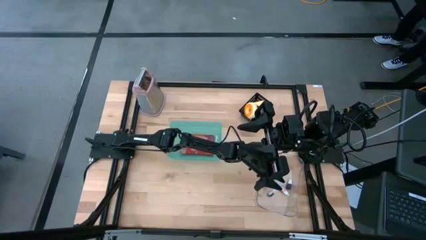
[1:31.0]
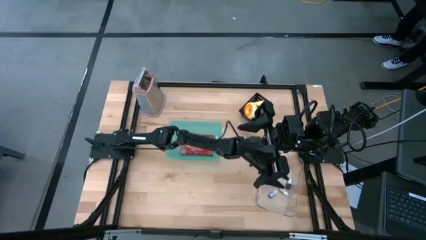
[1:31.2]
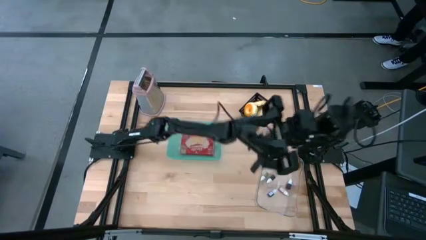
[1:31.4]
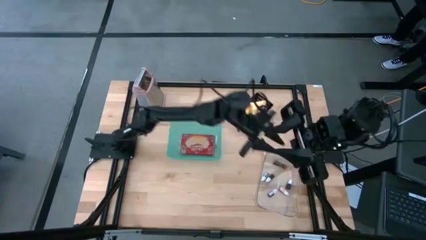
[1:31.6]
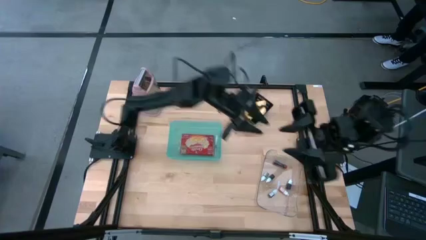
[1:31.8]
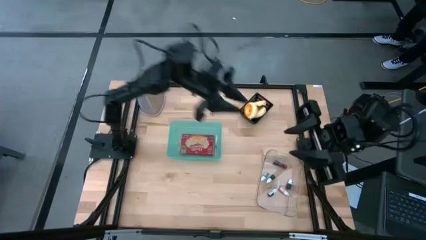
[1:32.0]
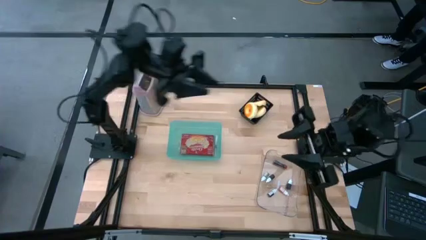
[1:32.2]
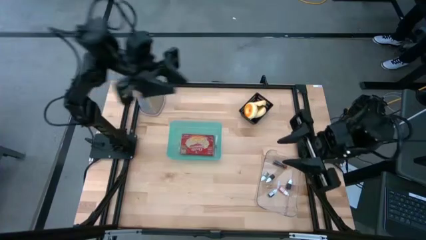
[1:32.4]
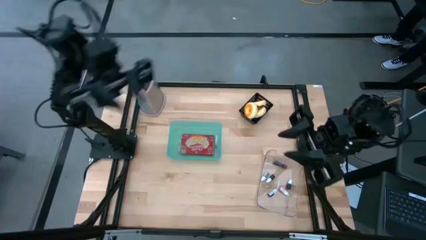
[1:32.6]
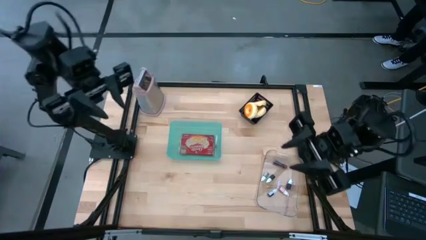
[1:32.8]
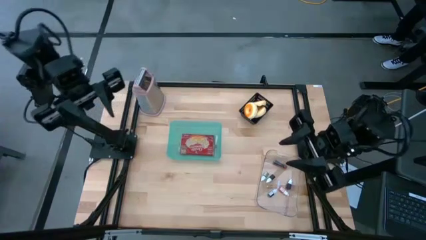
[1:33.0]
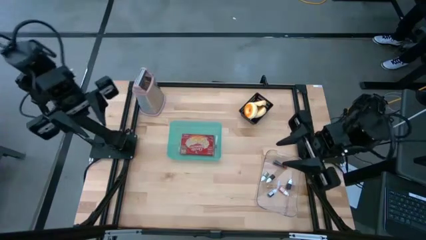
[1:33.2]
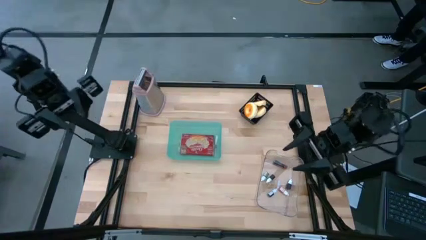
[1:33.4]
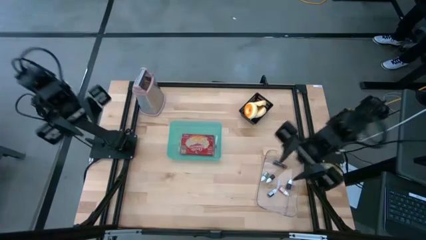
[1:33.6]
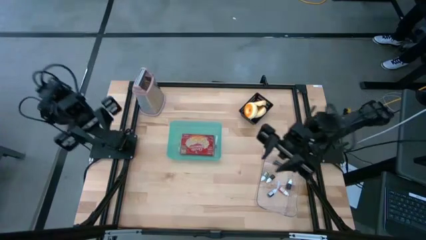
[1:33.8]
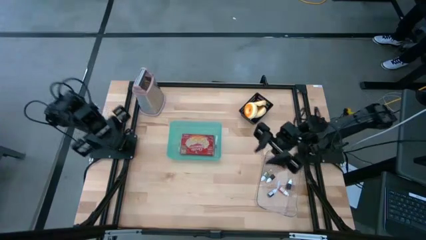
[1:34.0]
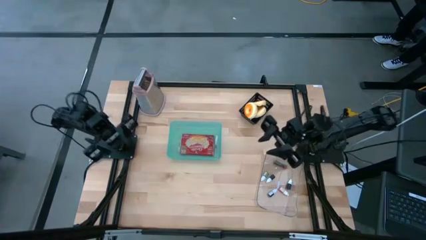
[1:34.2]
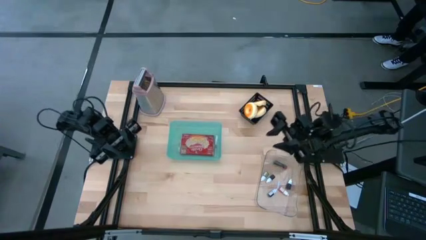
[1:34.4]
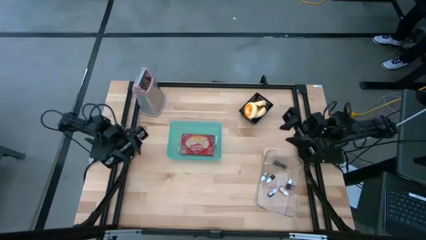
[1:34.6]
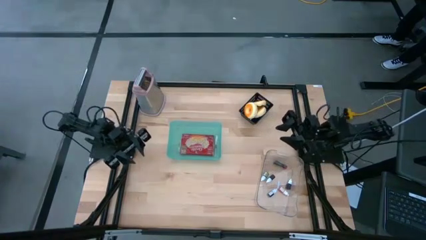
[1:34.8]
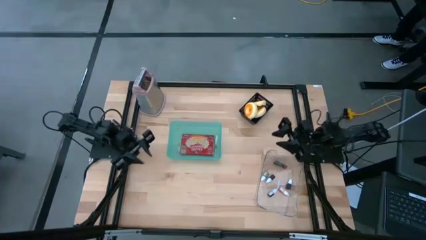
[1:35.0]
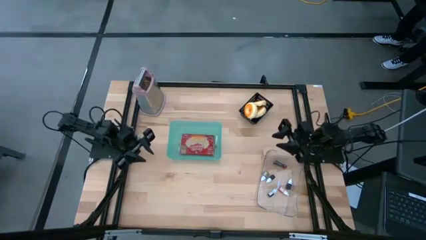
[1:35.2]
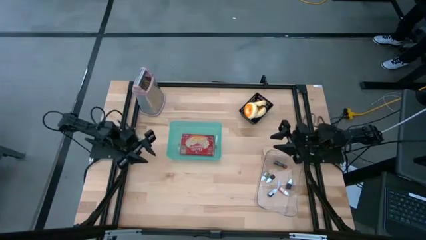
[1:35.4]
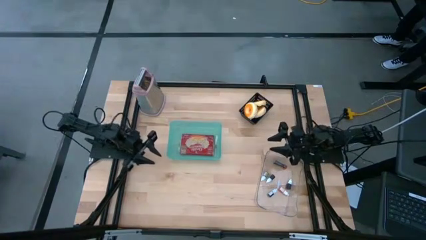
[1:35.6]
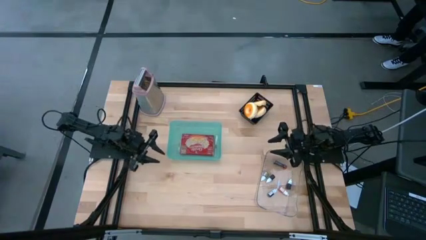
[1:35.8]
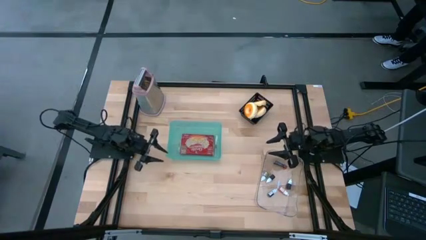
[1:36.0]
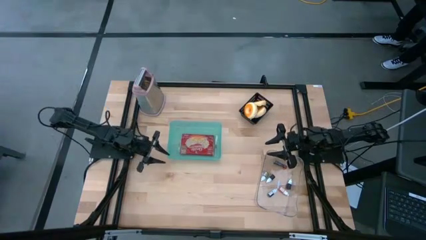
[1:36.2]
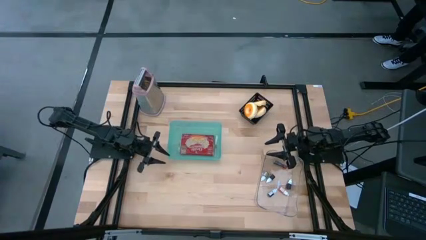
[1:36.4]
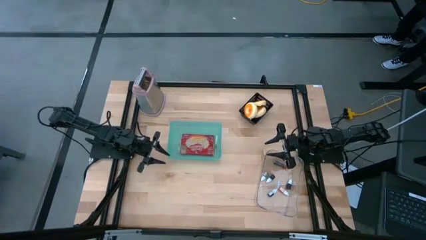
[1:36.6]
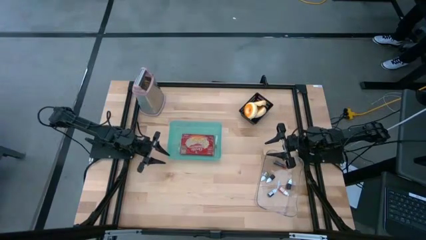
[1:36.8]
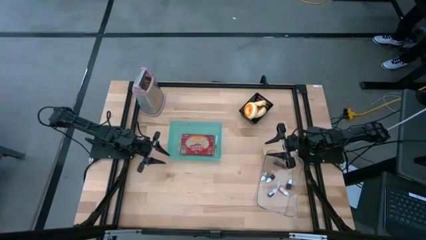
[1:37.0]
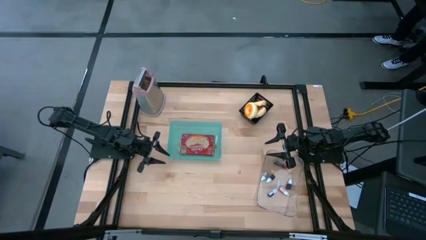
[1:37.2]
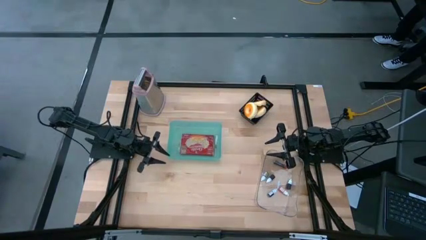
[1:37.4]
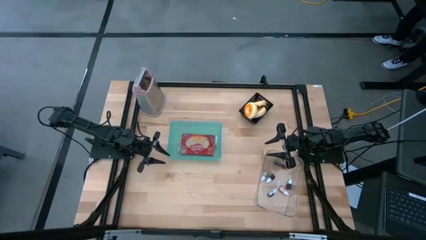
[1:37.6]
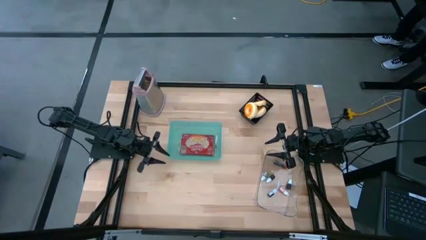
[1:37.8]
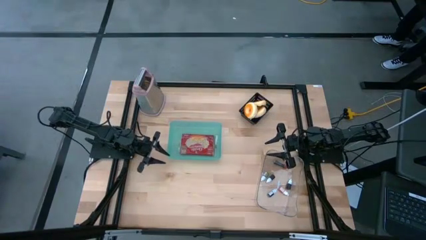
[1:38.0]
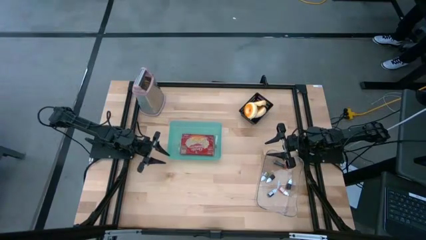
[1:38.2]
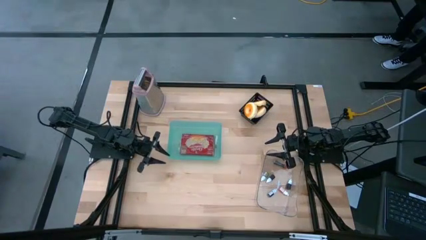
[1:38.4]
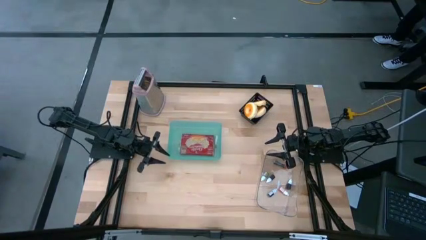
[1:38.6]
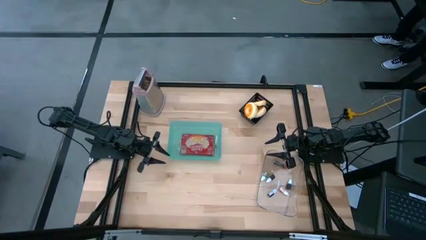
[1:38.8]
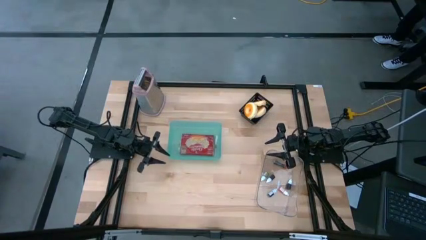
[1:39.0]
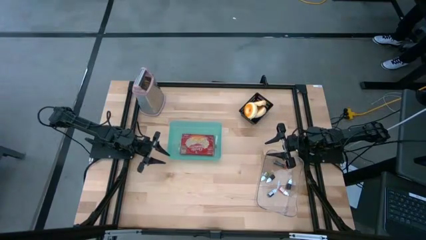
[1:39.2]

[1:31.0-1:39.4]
Return to Home Position
